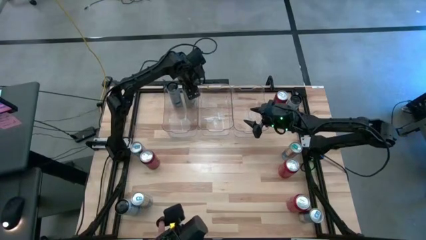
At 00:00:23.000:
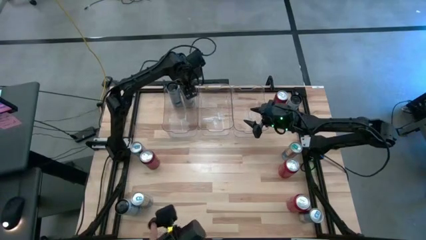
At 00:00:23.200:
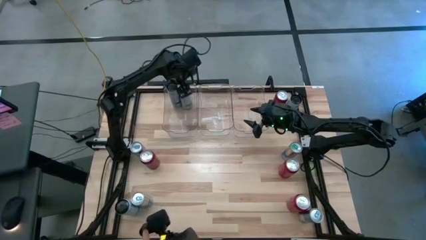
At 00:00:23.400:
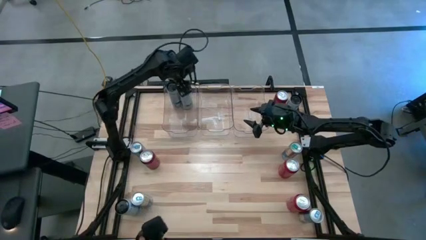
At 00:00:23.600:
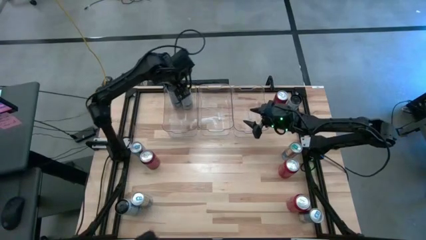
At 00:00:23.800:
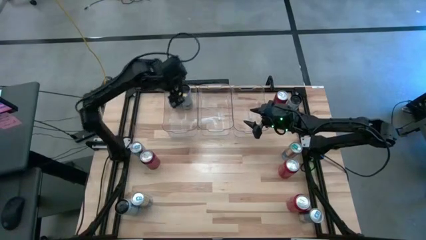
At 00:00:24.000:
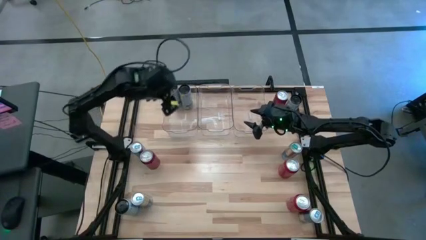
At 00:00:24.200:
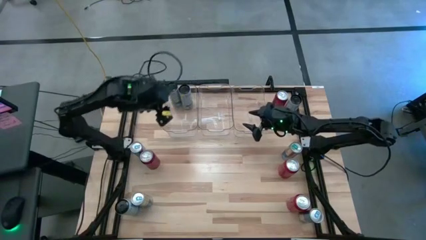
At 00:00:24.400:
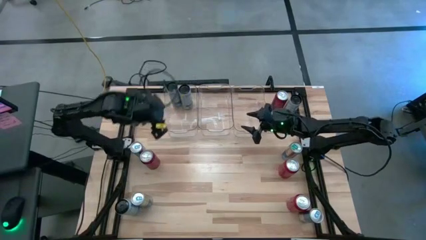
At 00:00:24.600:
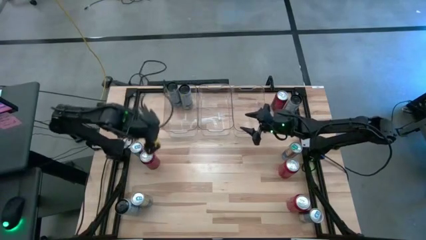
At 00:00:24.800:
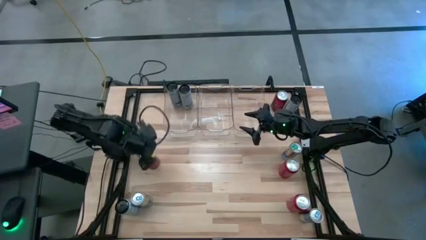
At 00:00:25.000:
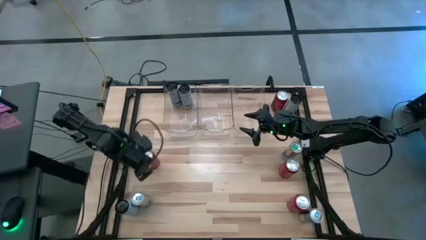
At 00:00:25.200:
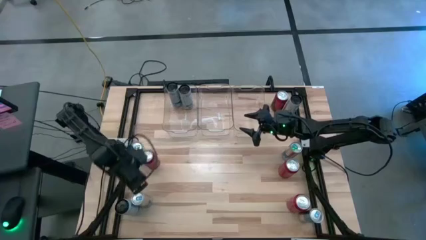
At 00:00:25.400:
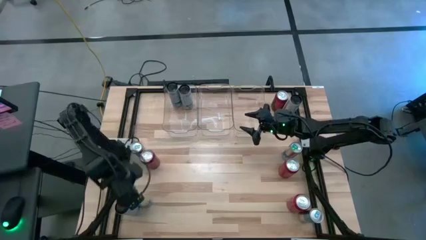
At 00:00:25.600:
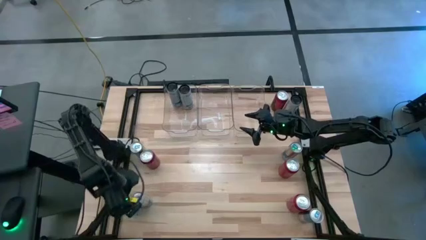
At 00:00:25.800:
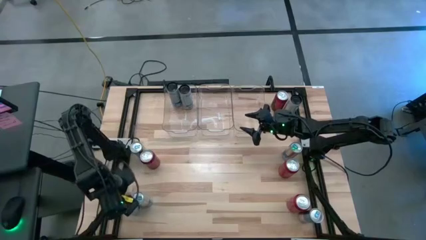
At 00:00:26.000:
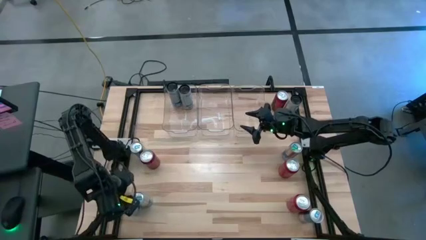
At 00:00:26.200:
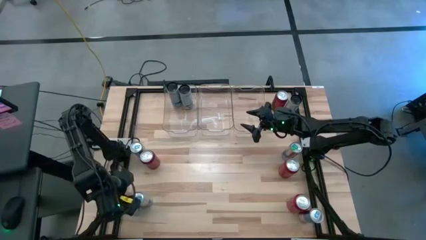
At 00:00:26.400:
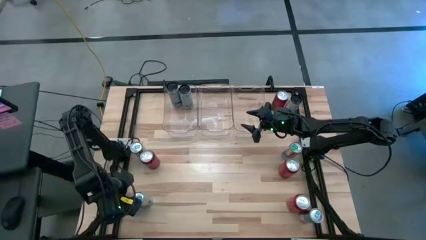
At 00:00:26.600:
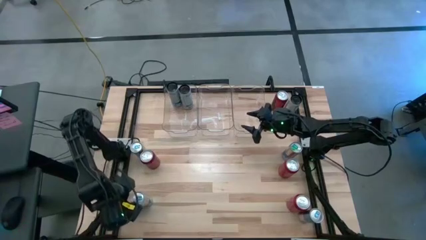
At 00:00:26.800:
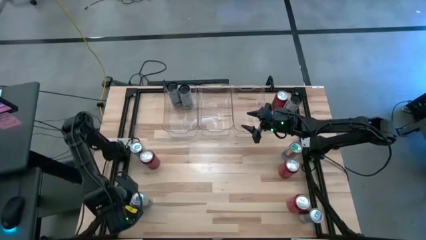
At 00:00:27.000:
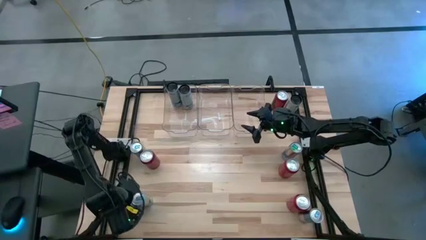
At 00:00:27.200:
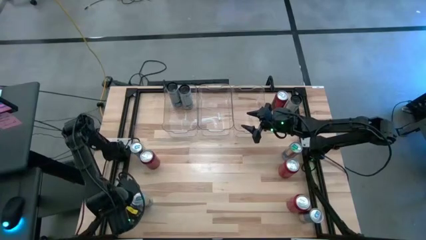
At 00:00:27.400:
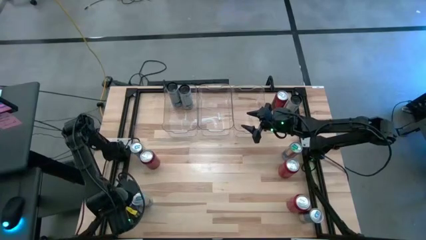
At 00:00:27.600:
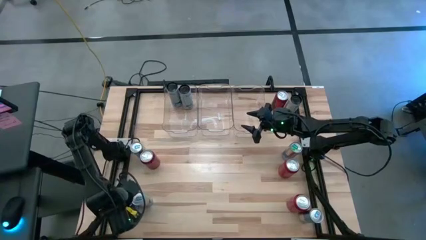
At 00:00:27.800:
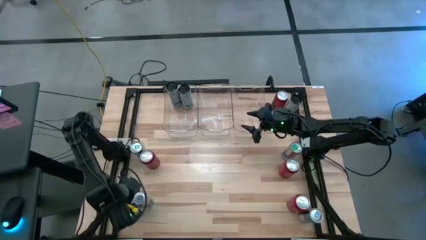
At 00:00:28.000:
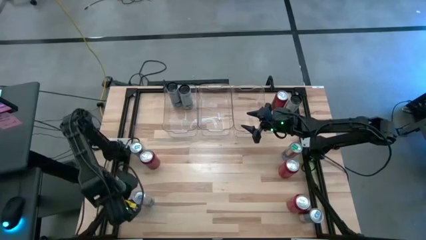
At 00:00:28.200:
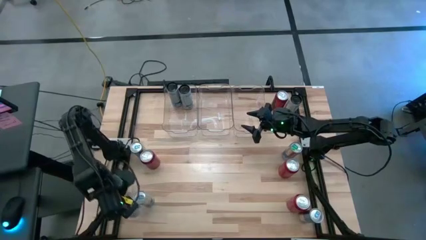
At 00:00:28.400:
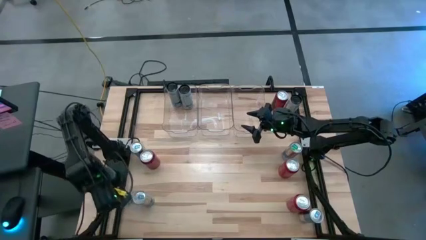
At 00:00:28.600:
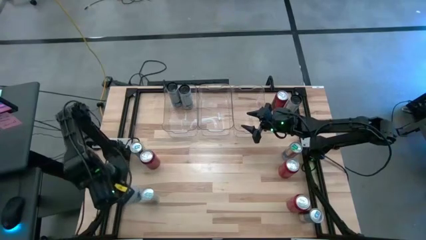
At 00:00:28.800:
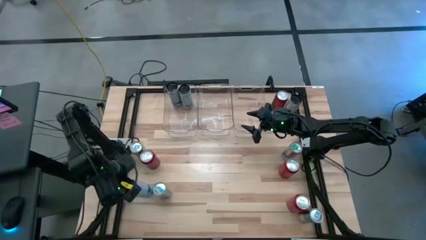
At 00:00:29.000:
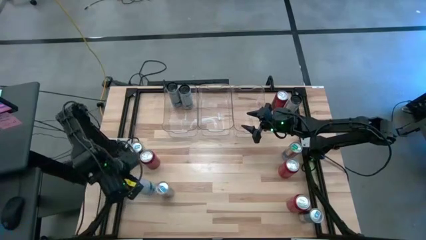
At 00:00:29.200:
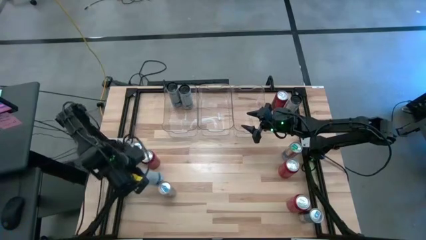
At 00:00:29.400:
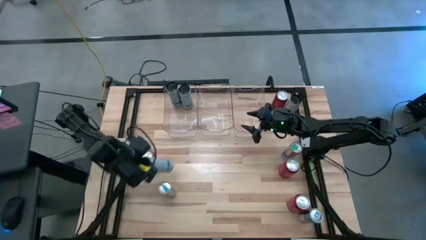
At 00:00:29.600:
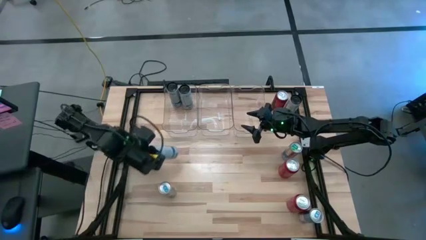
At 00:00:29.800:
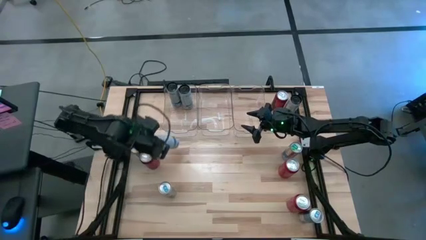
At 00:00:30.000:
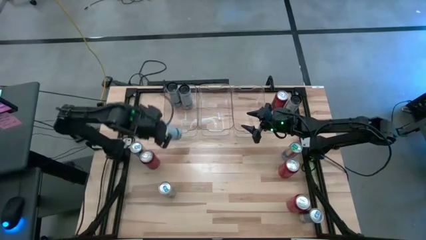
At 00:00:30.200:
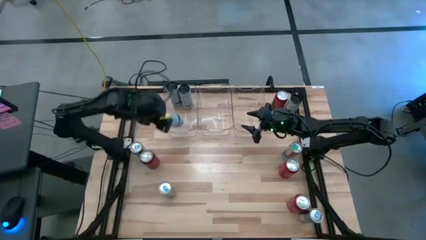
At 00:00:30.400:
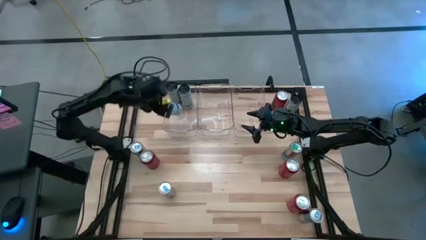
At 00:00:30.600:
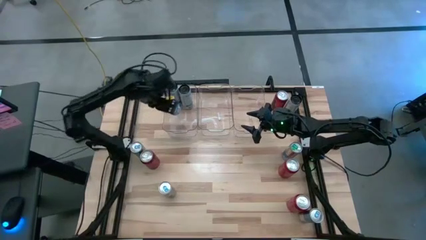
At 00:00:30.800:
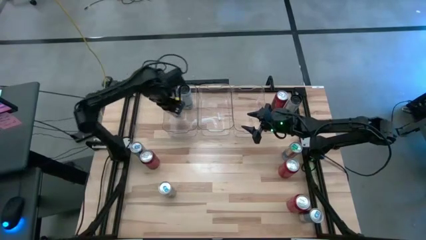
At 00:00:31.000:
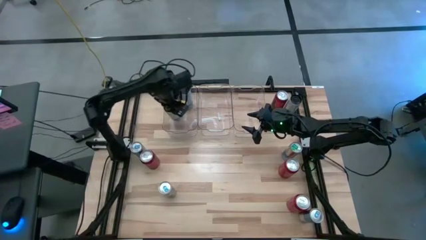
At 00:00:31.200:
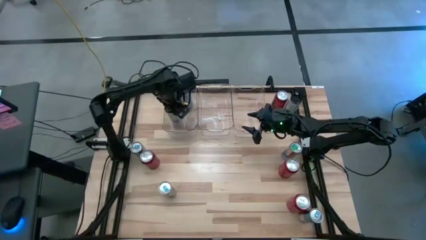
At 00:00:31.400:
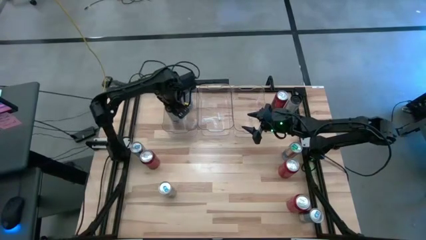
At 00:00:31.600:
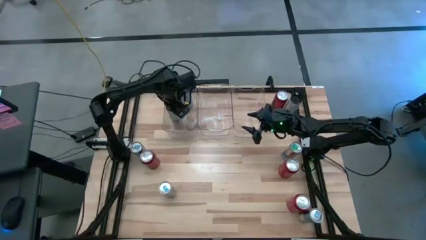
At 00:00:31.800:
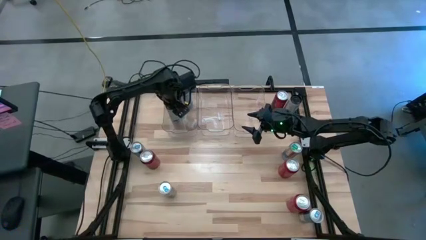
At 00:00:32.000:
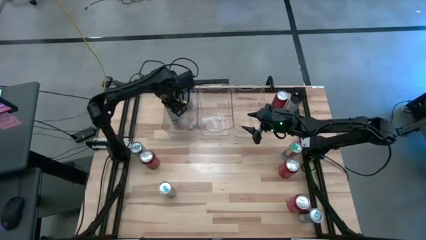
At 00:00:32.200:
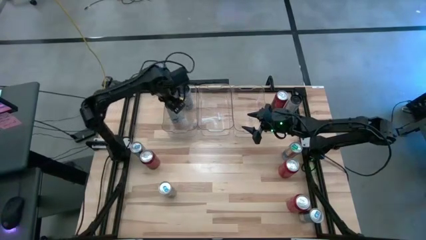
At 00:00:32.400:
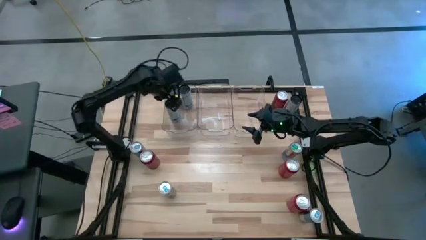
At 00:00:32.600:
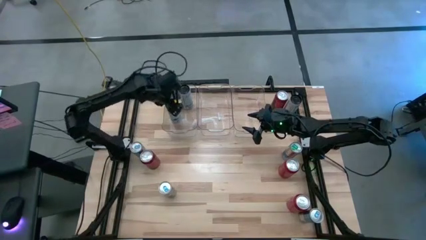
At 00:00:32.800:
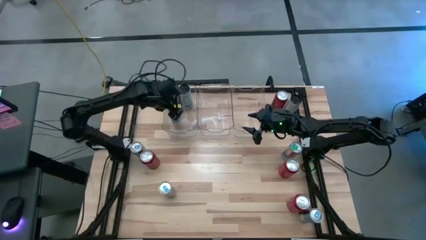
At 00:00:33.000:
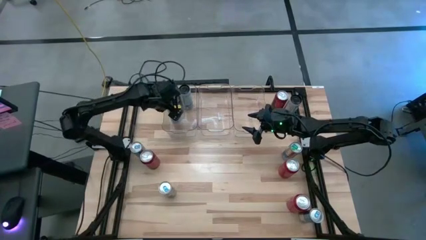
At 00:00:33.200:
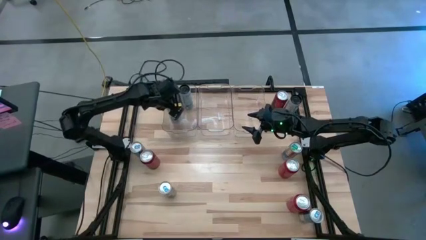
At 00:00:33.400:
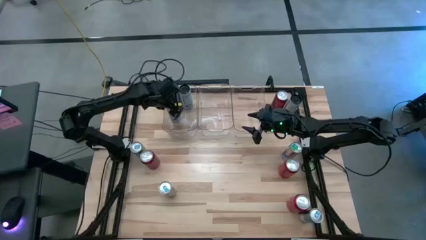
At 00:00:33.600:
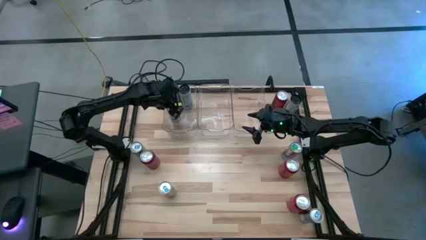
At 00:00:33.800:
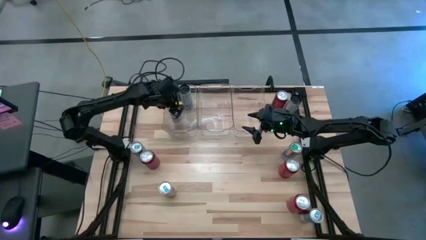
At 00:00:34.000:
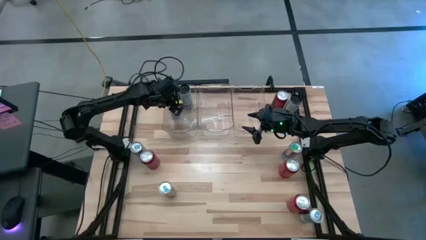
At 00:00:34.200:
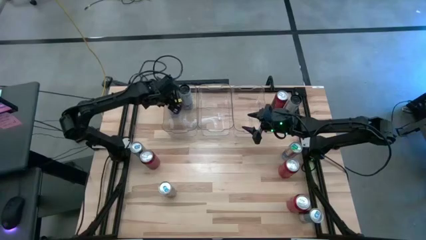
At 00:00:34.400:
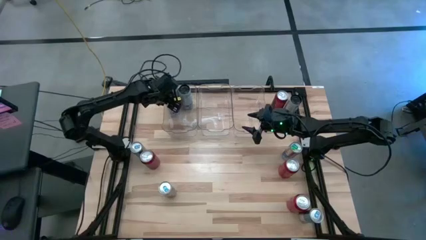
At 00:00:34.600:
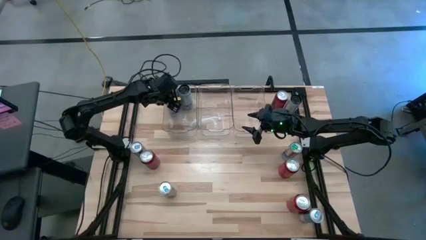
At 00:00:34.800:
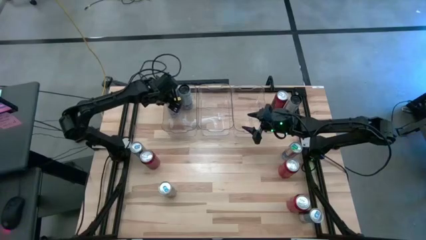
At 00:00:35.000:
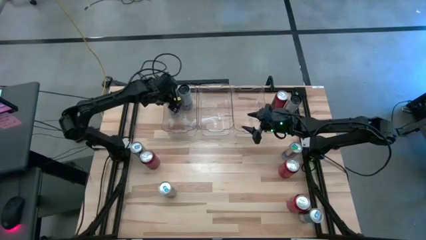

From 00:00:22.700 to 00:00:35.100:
Task: Sort soda cans
Put the white-blue soda can into the left transparent bin
